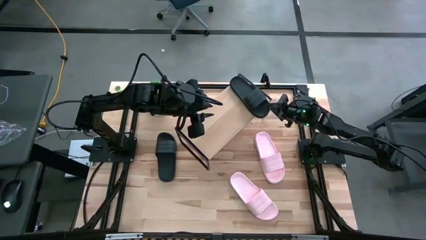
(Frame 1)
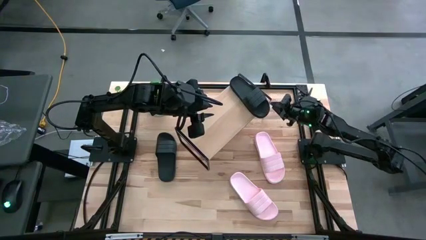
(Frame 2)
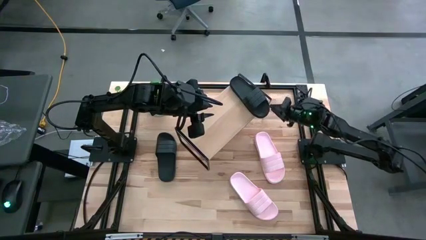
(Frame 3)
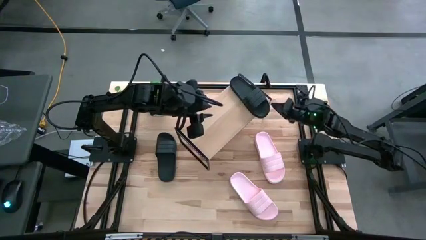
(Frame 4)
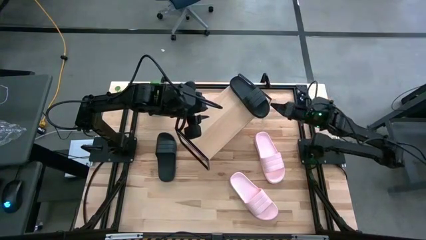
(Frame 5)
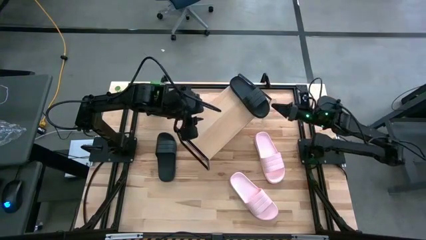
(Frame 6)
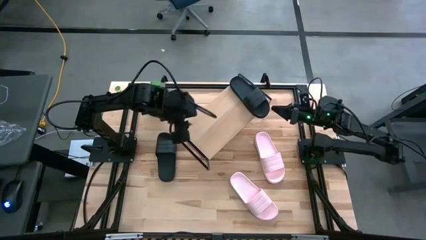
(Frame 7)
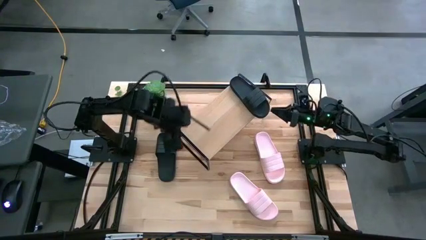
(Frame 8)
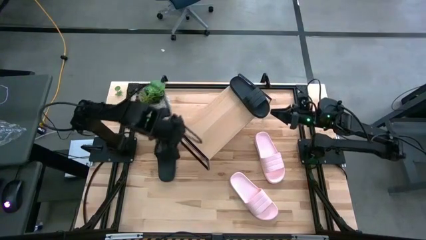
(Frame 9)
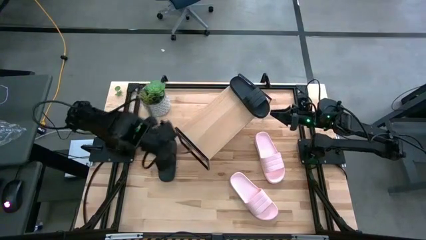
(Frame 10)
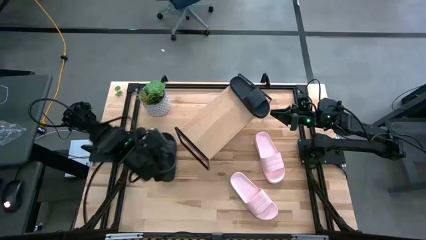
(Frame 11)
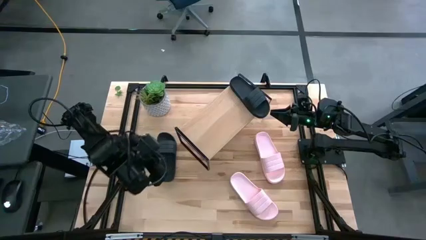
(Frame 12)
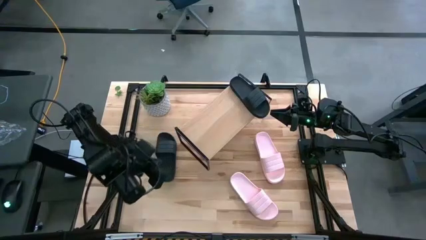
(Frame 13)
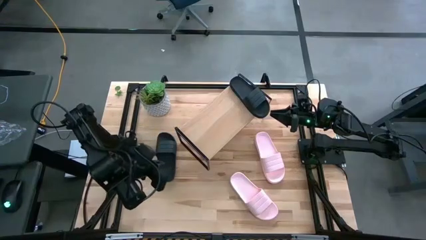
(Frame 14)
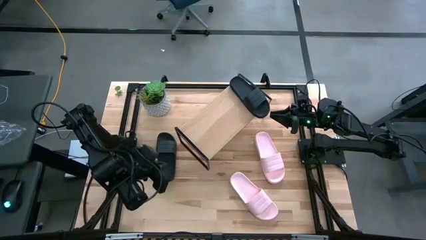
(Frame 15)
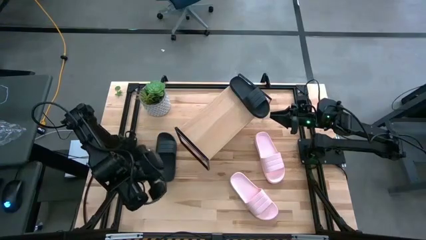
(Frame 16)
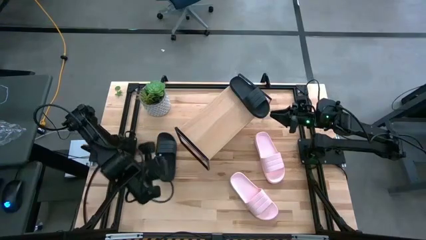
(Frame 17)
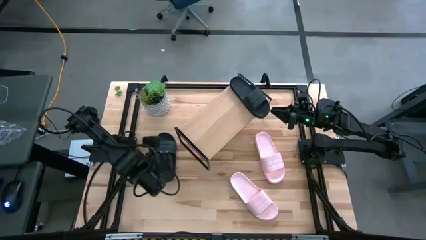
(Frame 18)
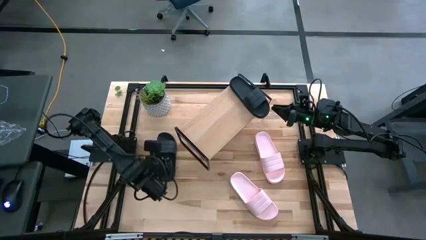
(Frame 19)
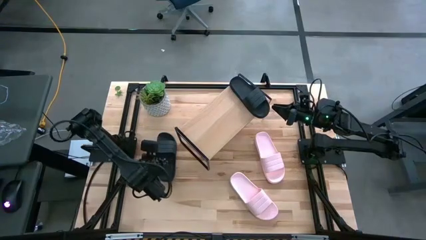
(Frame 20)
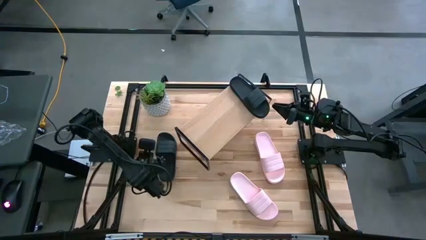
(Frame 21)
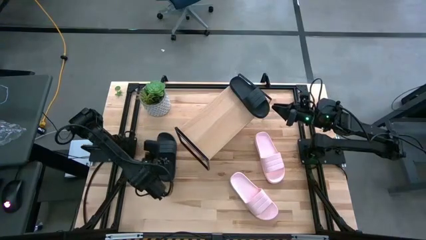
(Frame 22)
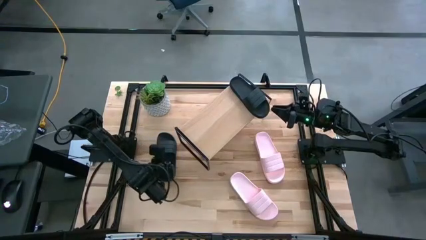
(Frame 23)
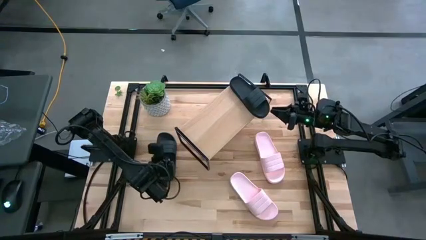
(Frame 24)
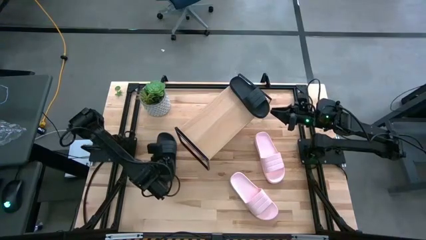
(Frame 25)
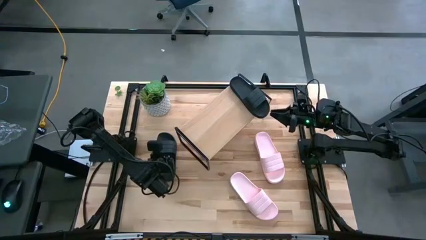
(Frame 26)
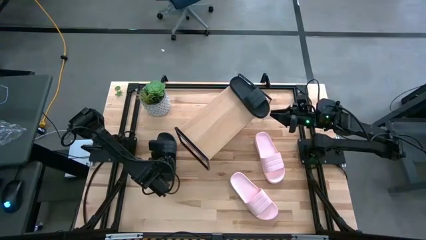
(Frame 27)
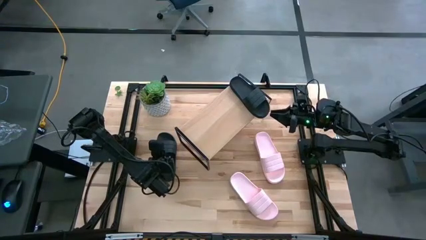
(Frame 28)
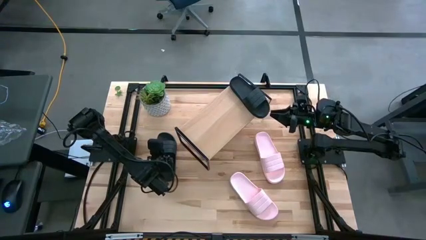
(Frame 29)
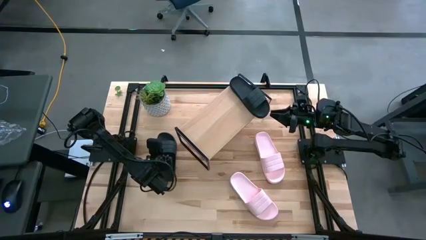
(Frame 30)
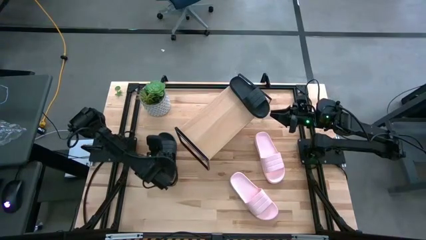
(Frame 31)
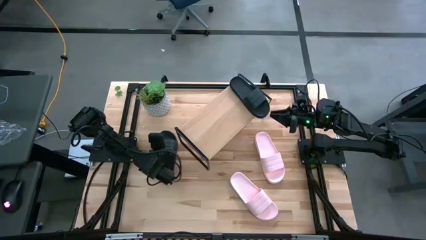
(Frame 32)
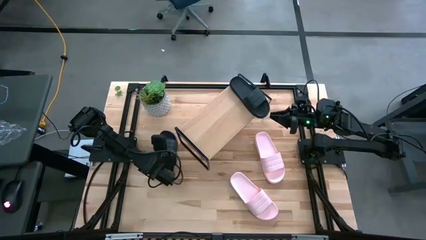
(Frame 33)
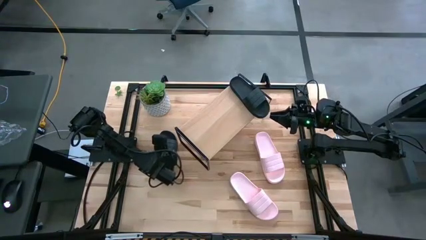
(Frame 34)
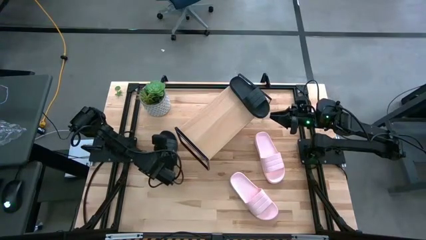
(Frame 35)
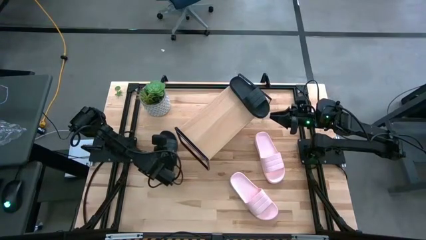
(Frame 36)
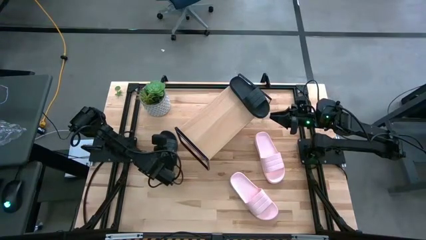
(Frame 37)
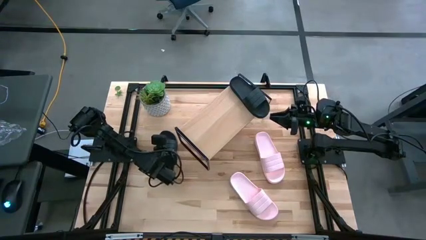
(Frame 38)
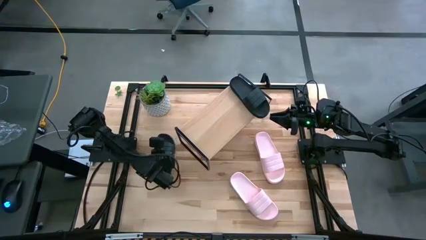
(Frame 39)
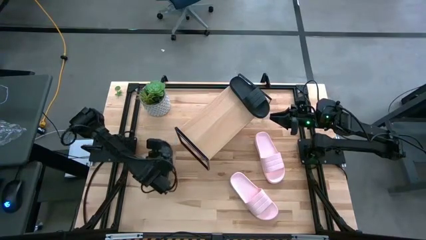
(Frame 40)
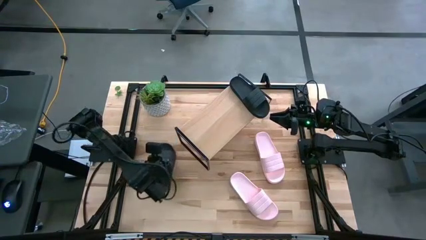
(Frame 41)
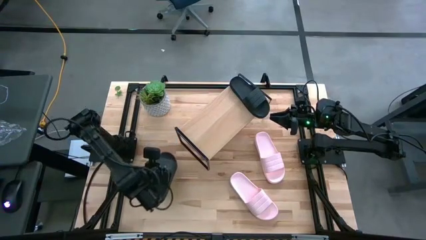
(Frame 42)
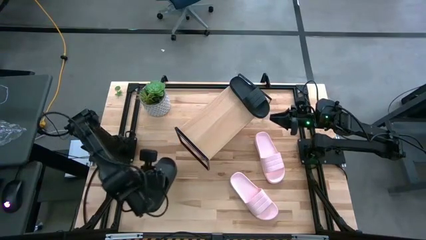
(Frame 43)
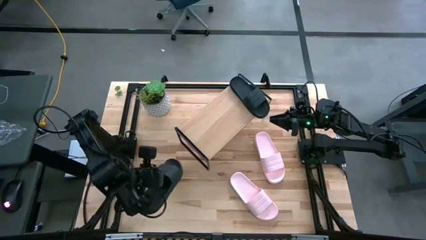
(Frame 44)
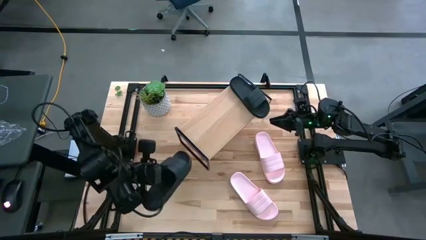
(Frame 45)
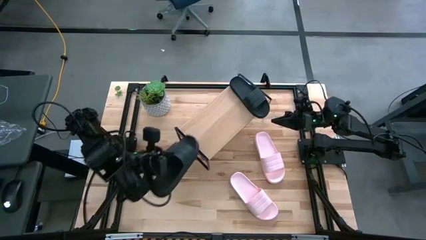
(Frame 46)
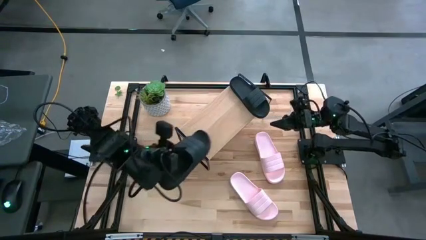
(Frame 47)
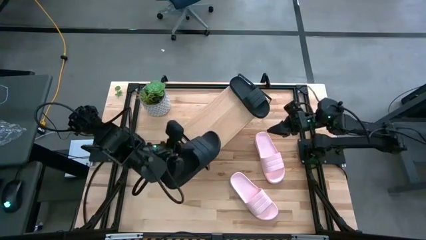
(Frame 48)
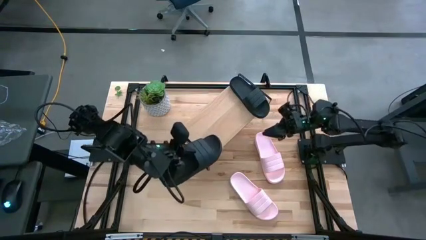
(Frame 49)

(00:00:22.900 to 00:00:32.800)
Task: Pick and place slides into the shelf
Put the black slide on the shelf

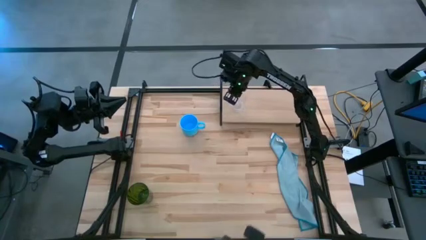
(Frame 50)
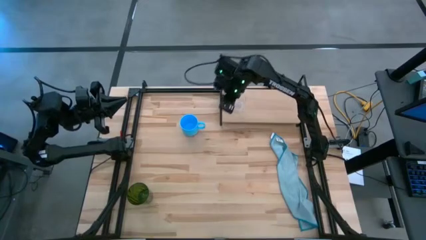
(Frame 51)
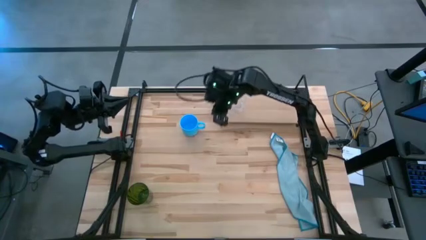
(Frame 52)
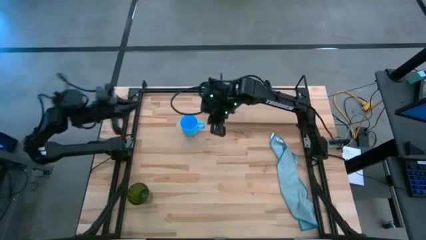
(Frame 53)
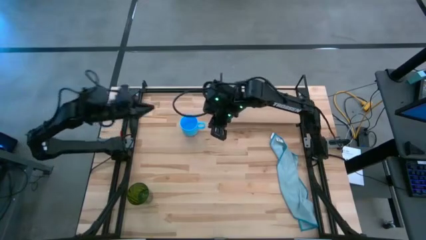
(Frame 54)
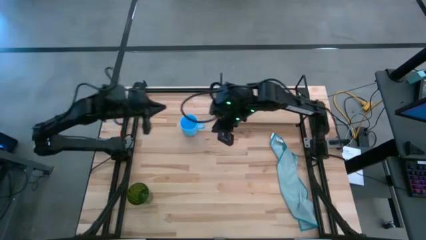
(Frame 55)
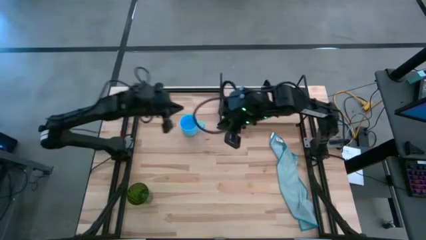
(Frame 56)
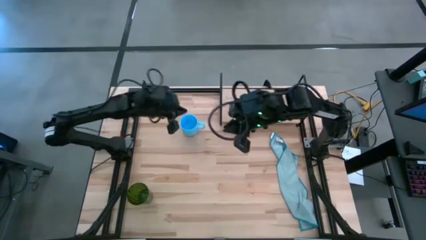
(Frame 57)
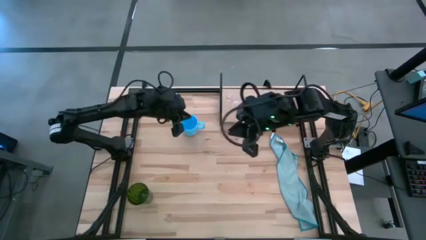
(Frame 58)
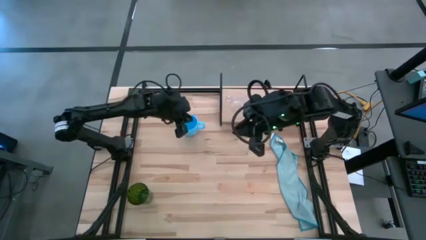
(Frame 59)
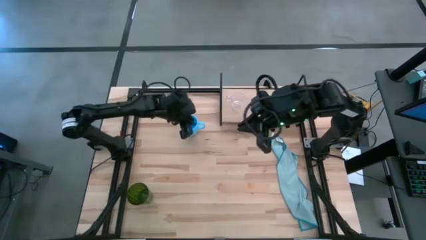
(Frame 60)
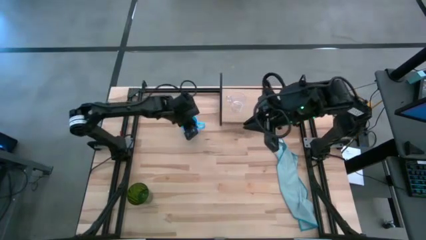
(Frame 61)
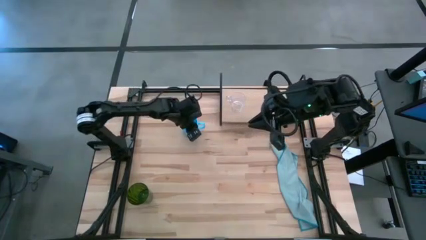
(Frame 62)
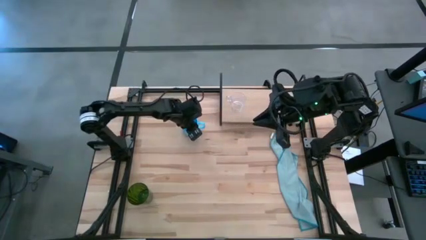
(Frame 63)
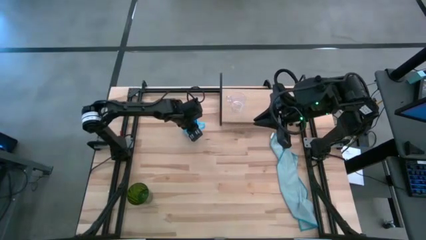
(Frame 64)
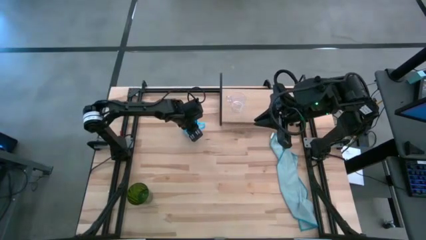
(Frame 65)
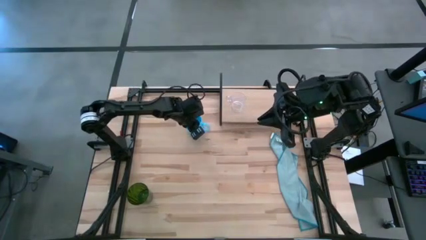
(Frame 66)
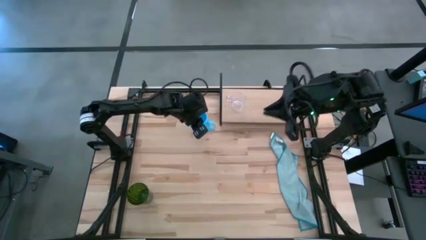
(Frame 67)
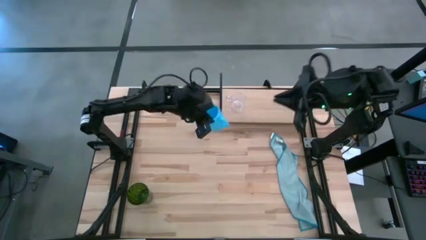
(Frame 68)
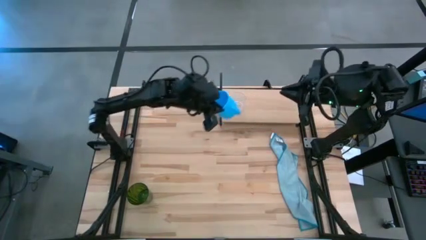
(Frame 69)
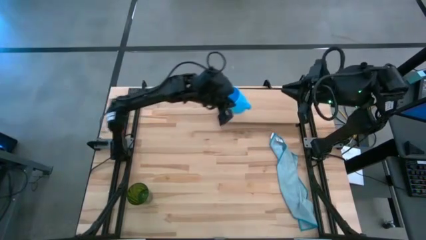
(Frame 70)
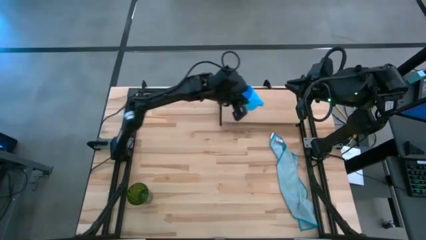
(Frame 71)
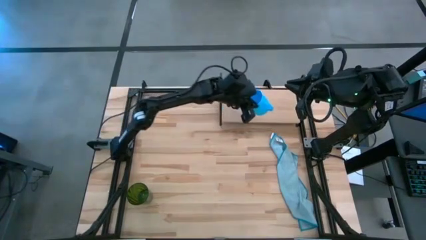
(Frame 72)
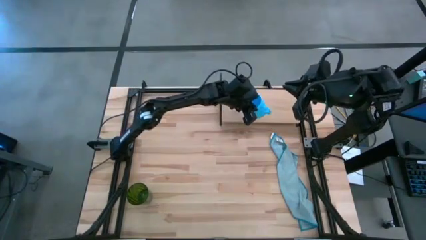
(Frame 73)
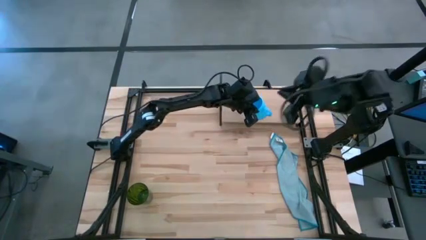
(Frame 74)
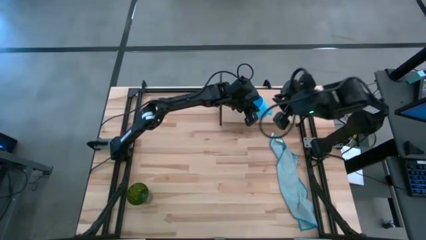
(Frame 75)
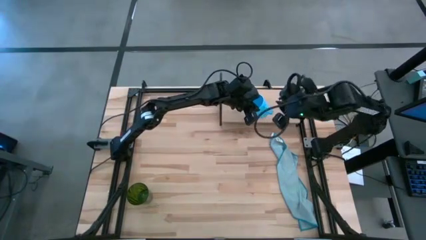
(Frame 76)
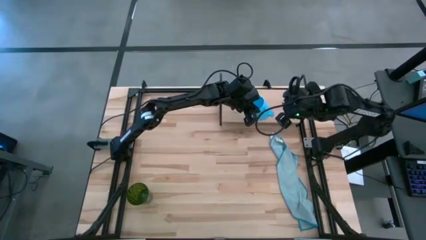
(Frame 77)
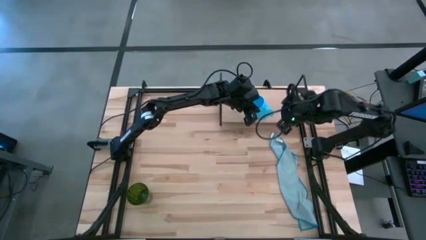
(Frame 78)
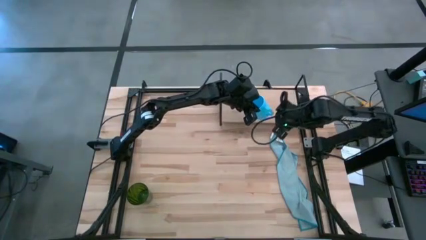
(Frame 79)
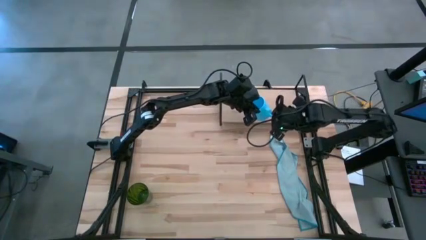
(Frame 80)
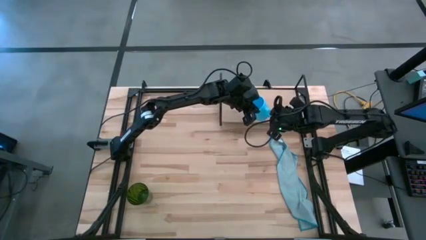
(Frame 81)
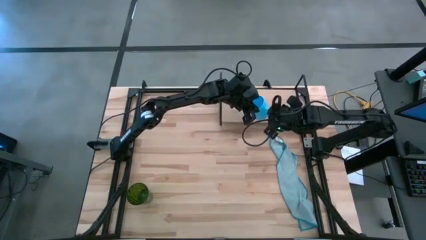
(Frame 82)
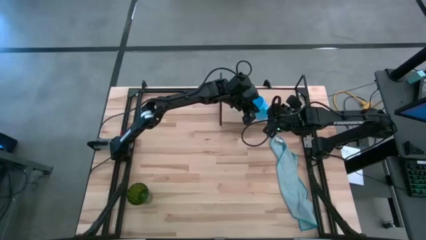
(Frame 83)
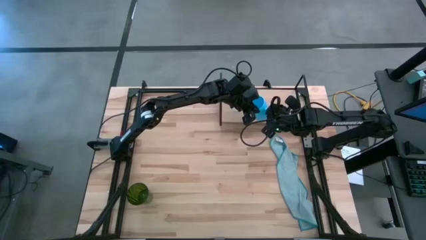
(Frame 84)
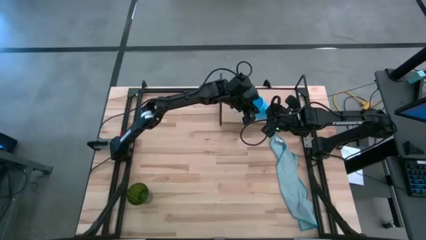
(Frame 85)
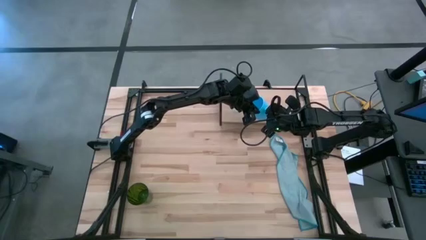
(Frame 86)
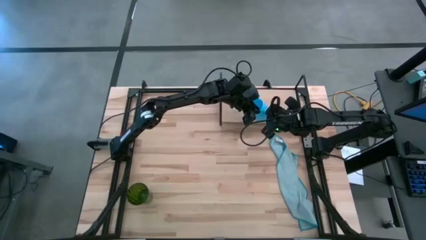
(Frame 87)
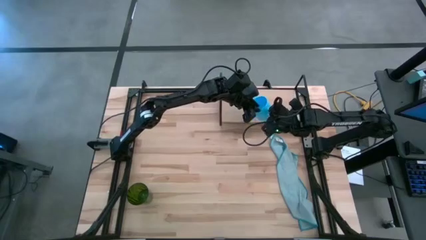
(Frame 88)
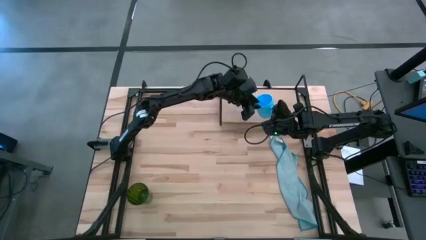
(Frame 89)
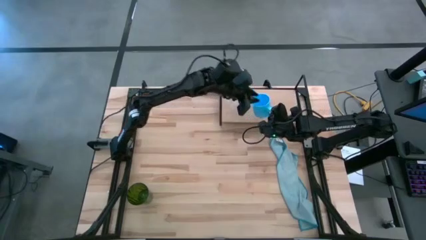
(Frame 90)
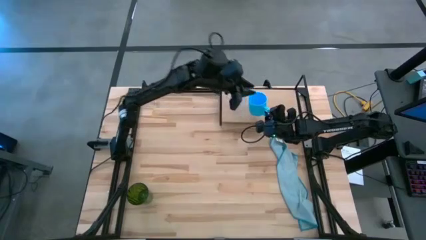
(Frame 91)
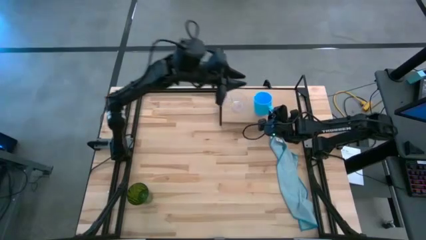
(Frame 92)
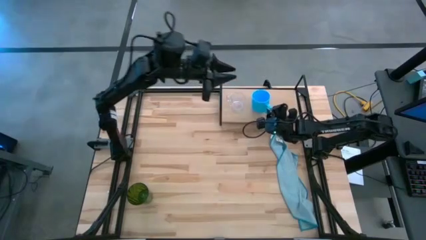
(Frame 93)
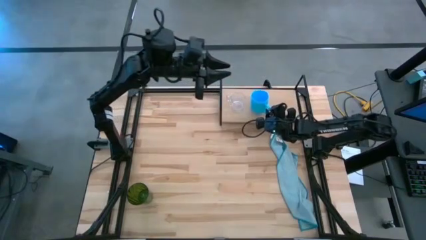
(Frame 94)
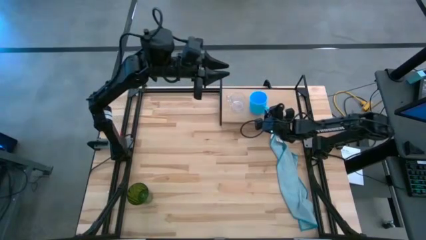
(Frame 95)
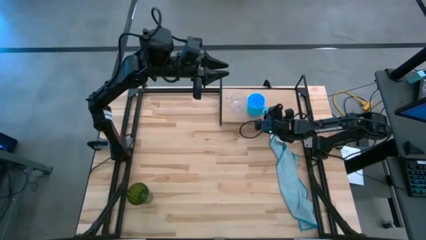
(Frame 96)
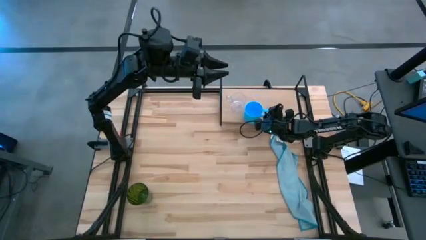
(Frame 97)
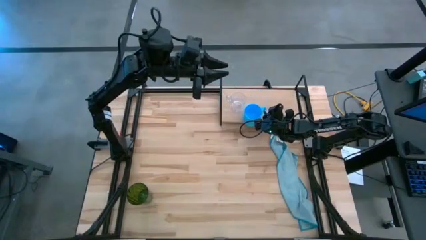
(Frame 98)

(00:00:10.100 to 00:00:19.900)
Task: Stack small to large cups/mugs on shelf
Put the blue mug on the shelf
